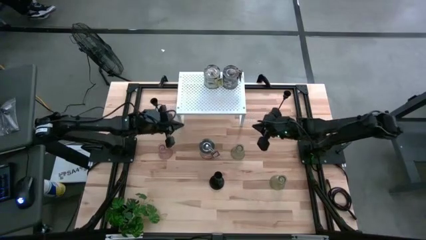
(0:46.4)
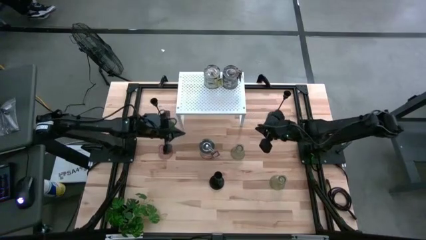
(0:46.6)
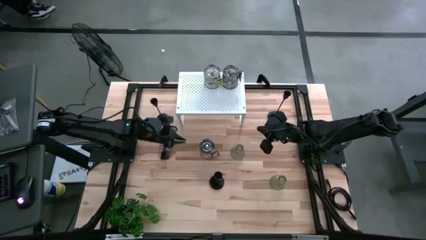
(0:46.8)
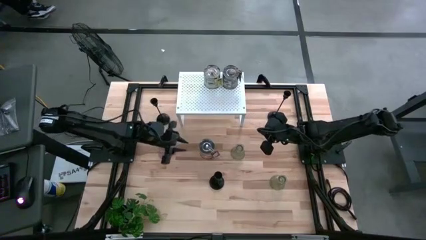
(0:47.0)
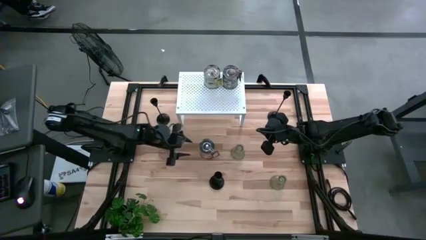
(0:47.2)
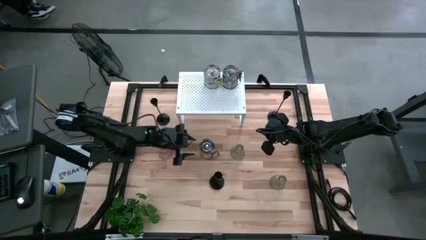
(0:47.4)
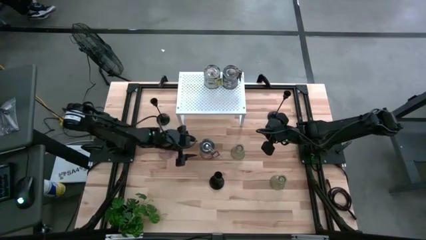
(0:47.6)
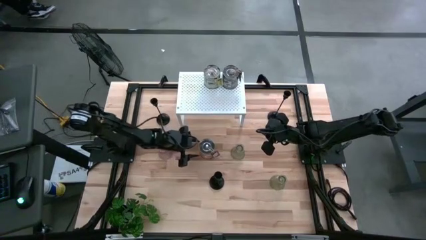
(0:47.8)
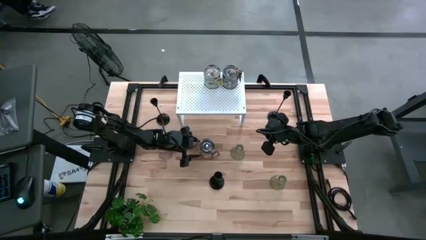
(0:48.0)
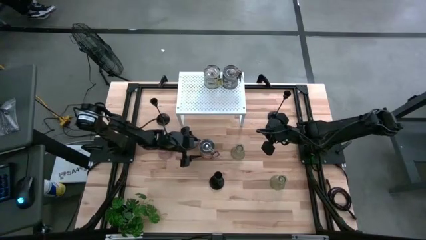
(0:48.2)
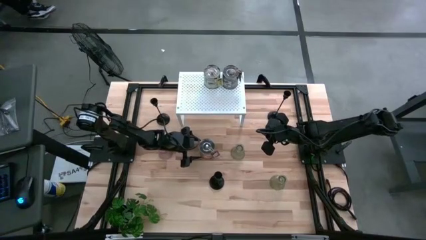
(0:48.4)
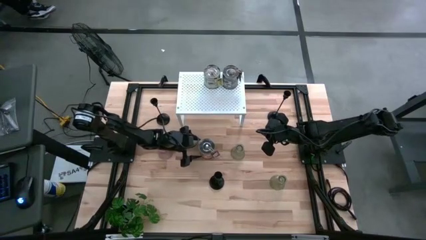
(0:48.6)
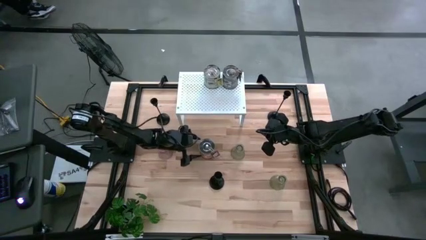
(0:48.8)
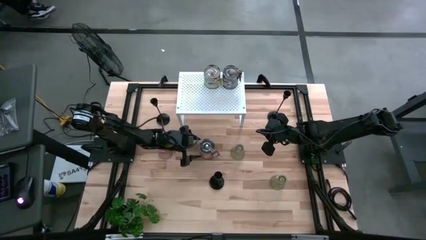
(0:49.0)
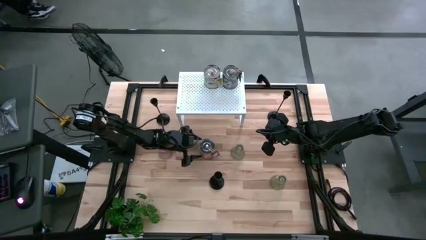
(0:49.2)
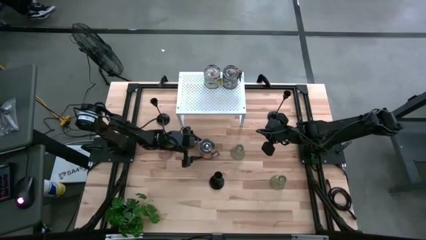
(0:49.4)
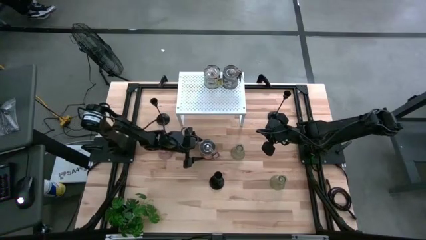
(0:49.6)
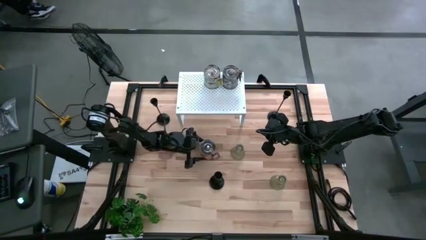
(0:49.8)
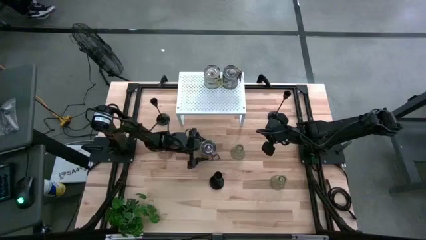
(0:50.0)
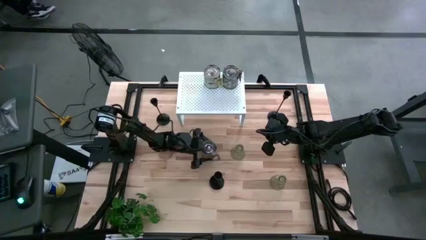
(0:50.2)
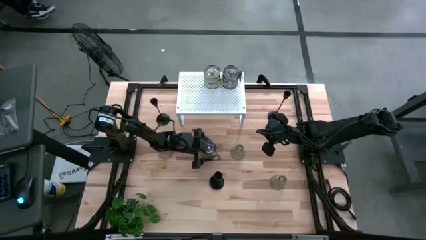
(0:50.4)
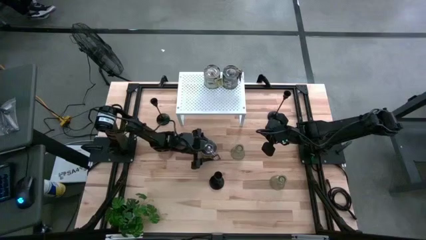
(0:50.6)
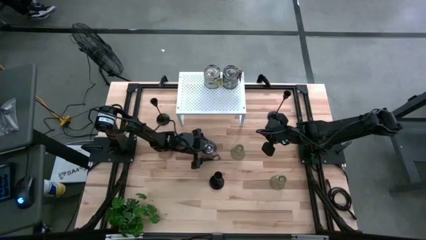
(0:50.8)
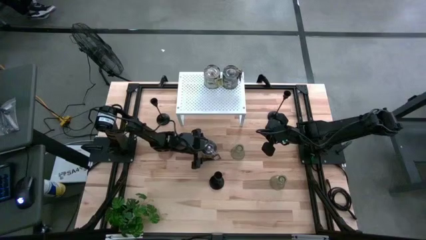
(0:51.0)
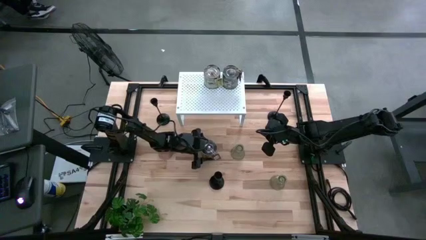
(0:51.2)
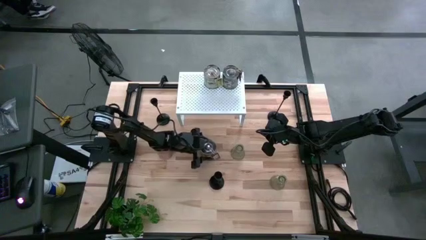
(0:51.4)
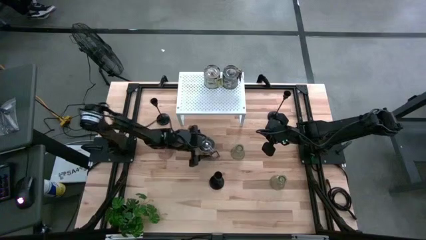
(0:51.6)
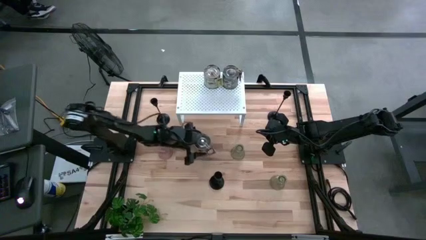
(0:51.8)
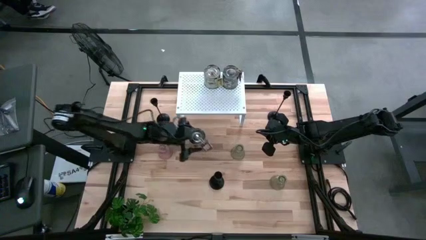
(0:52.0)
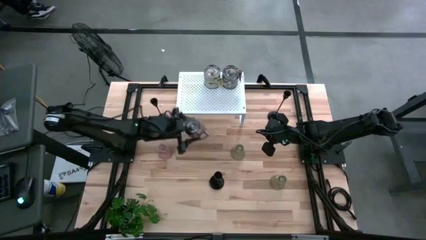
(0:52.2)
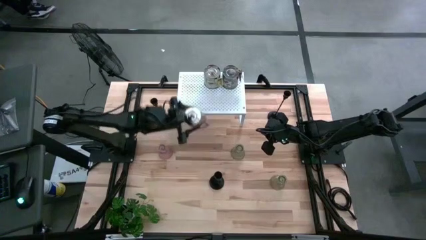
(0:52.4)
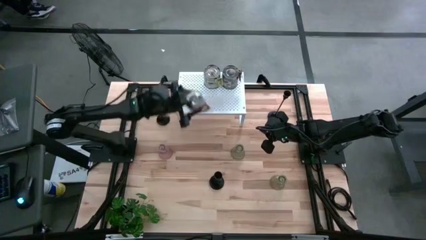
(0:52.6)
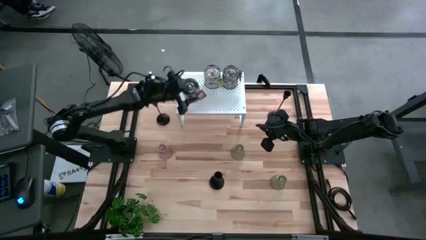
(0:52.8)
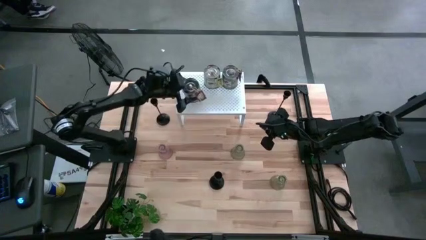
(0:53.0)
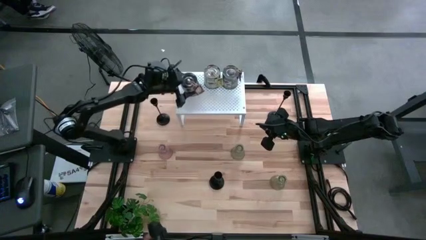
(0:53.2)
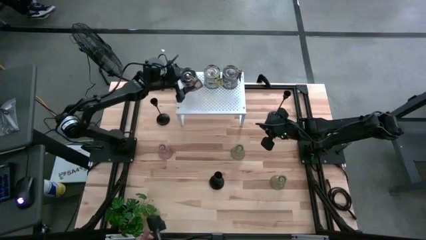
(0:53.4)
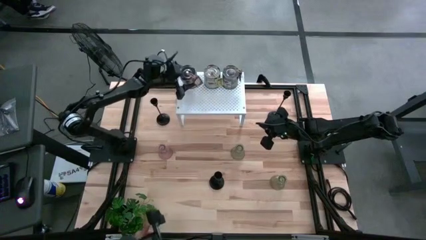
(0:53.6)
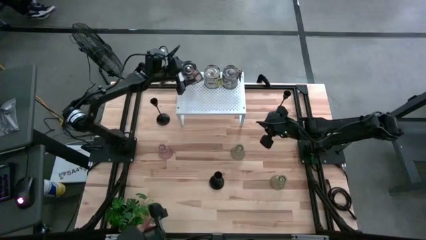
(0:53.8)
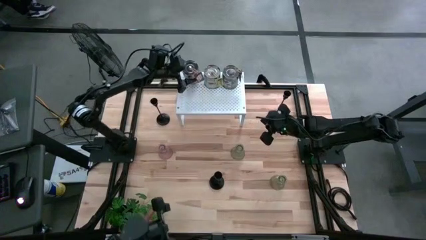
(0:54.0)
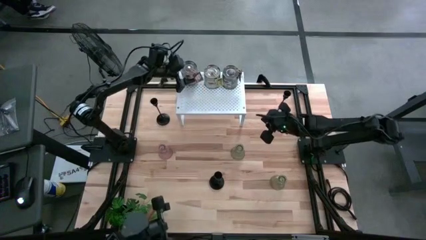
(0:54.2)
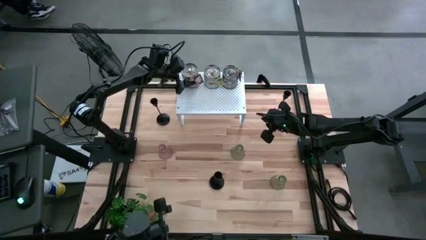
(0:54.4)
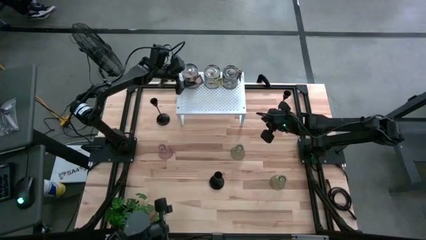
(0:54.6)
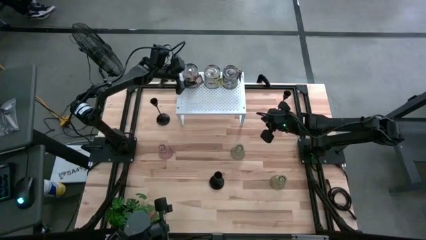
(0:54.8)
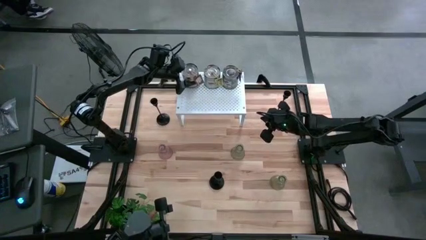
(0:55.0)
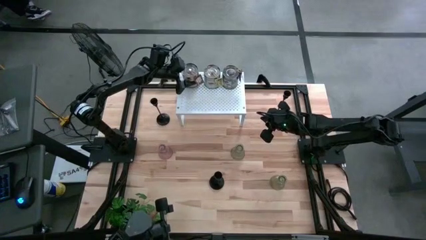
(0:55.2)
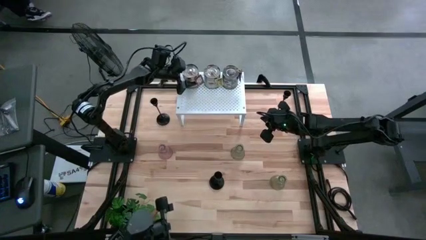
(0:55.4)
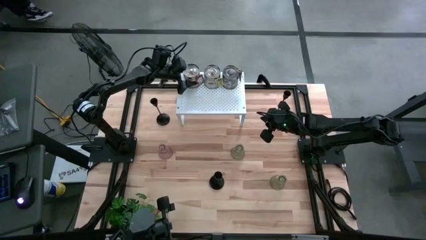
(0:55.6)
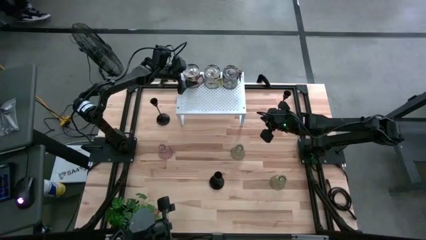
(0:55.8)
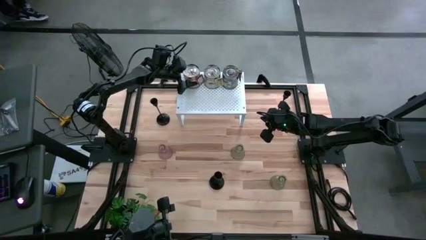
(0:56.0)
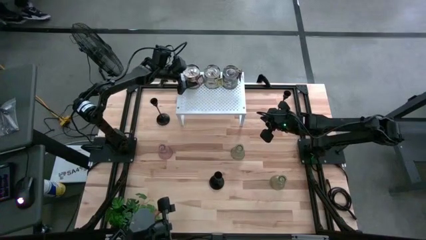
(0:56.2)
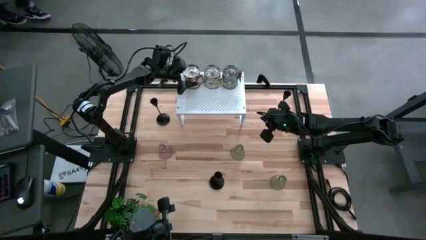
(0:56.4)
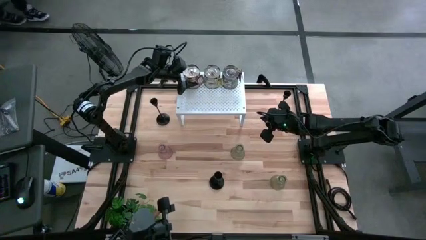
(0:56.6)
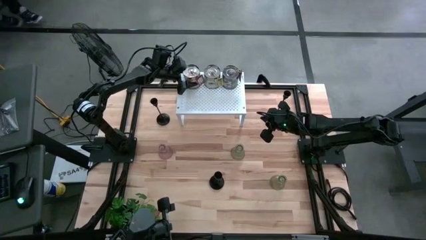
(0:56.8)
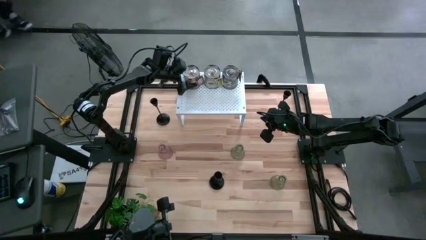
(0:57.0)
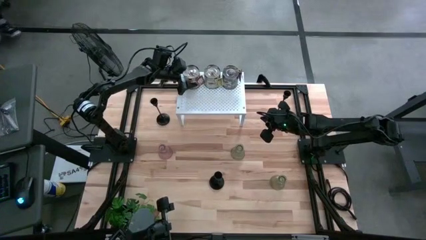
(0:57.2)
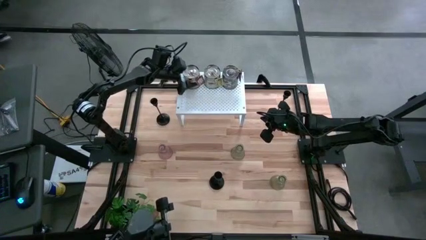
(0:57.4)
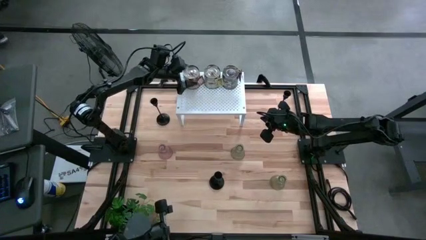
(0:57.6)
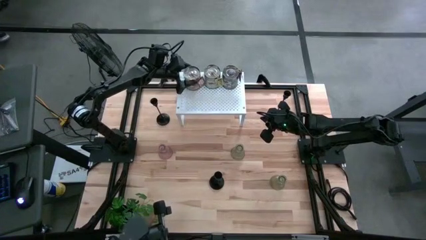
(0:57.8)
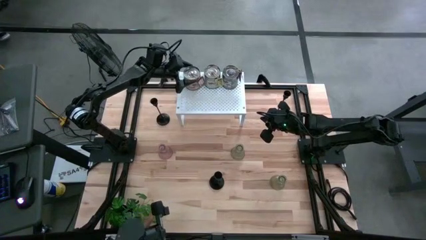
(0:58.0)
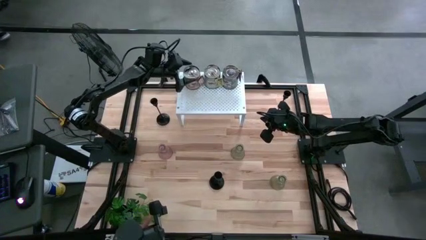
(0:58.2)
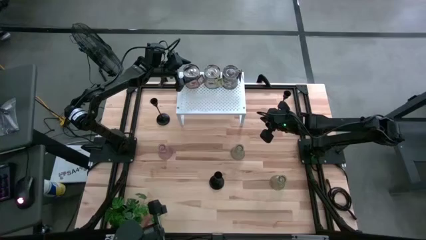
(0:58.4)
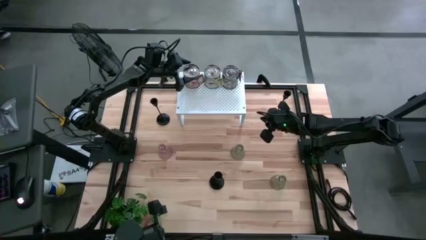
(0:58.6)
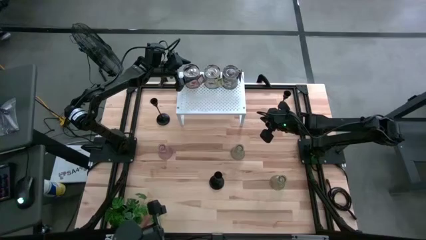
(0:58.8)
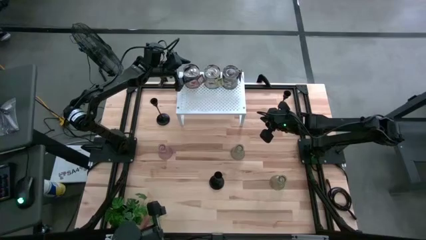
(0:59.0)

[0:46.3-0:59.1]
Task: Pick & Place candle stick holders
Align the scented candle on the shelf with the other scented candles

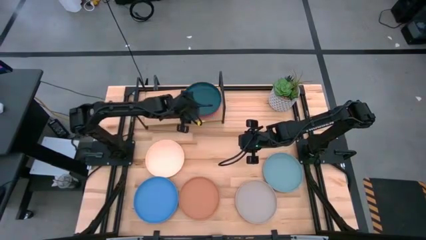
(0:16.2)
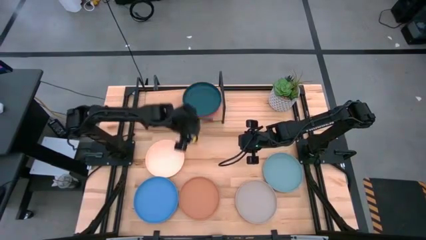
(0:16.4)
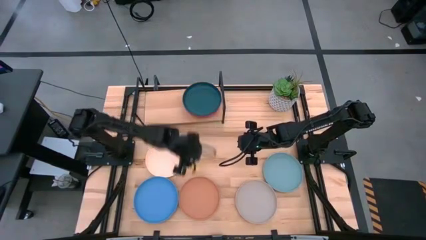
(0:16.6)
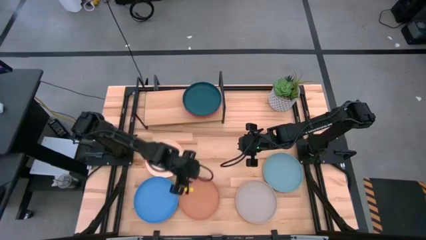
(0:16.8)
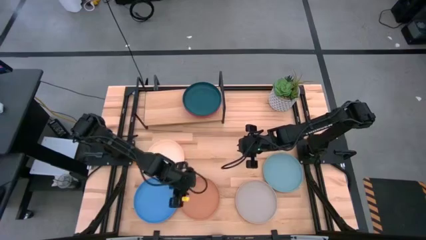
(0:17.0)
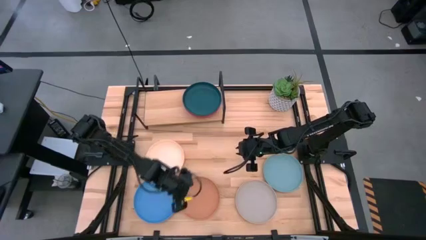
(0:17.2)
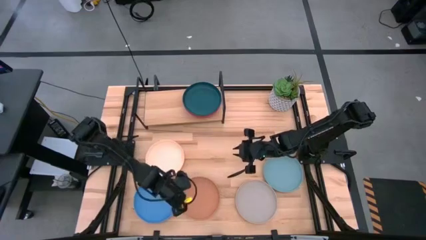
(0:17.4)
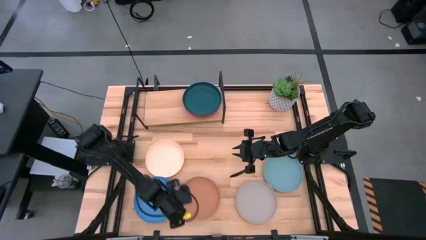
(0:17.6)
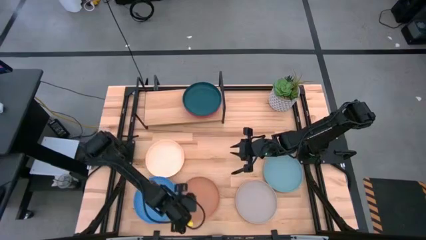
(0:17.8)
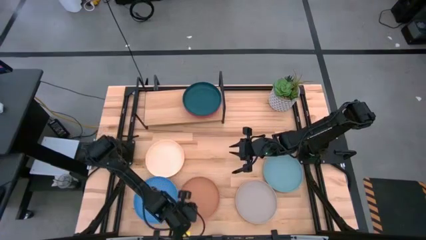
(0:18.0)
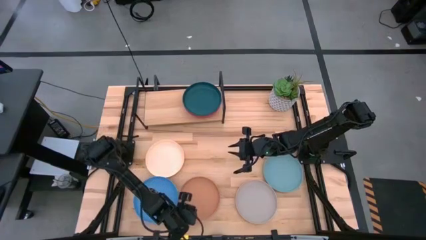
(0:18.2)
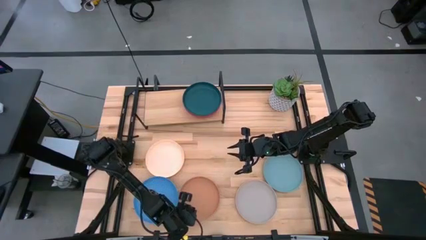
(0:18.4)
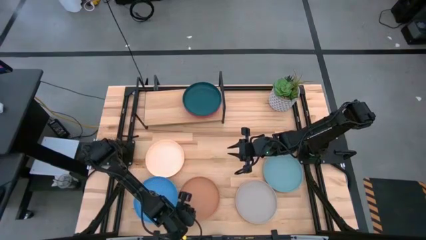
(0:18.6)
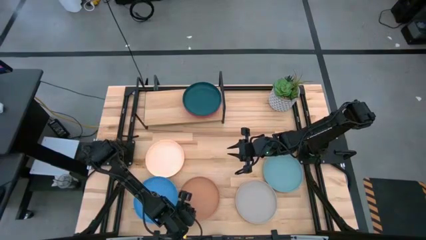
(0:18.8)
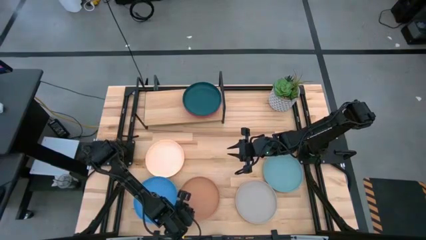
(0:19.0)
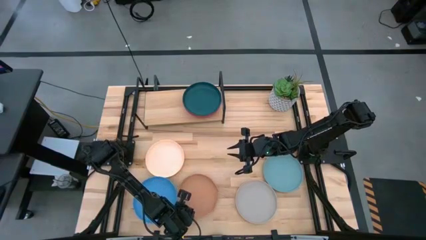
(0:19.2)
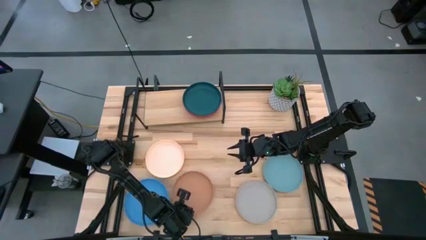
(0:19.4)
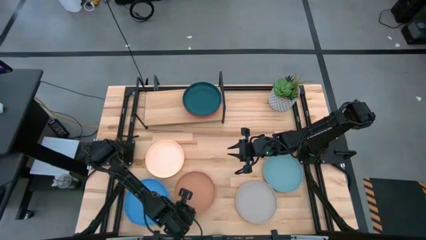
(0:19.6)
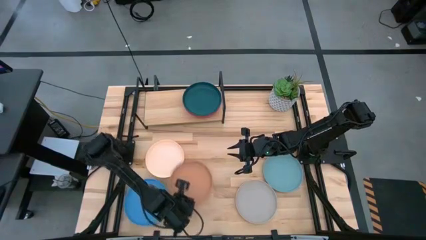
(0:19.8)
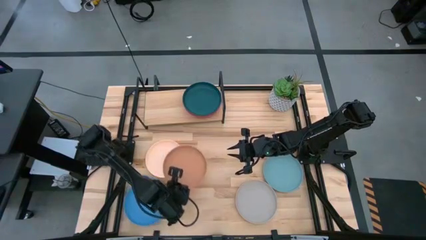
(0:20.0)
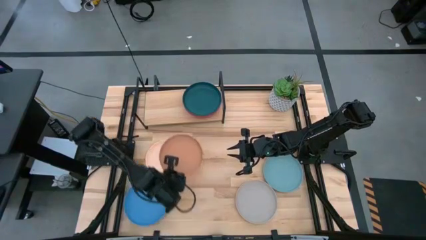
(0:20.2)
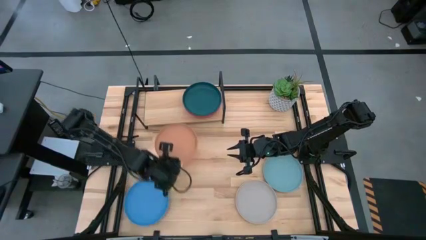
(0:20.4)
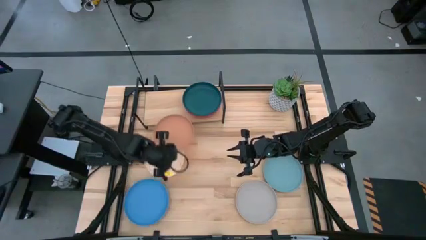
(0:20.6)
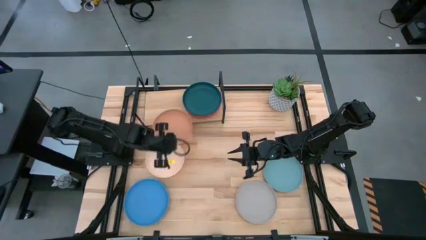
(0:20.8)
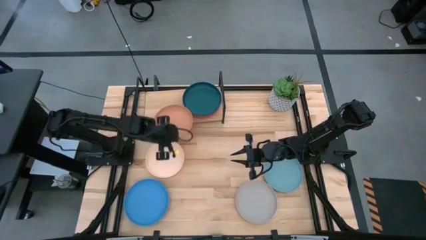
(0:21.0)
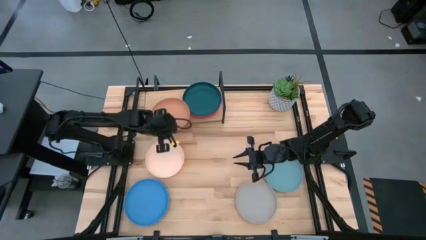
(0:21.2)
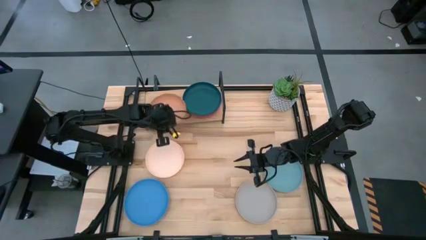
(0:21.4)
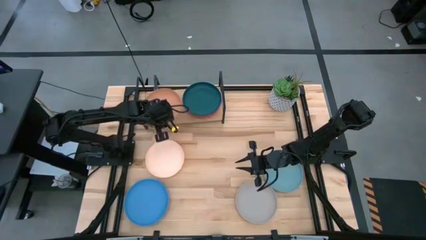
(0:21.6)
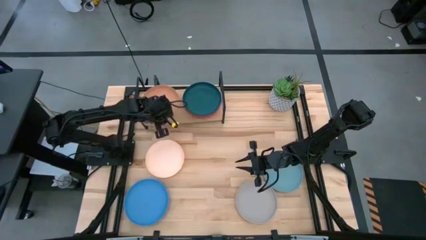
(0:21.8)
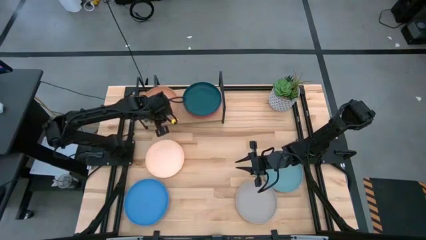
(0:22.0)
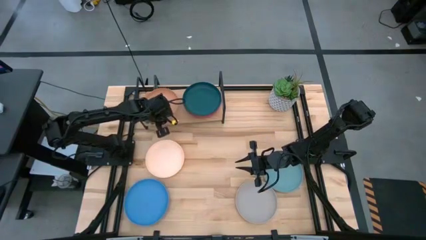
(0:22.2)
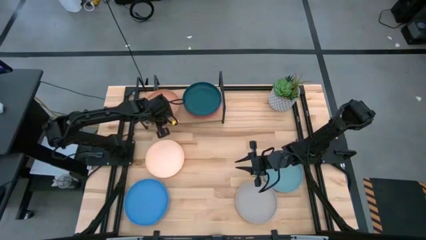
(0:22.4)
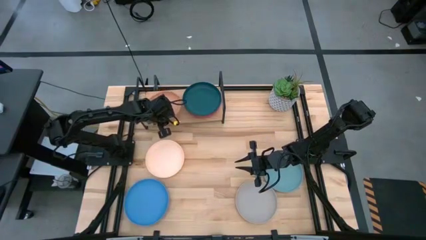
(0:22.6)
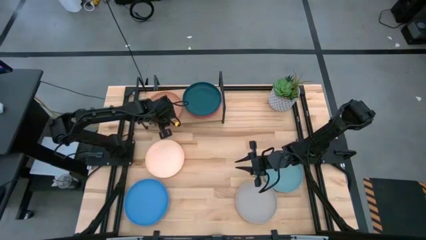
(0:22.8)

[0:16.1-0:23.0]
Task: Place and stack plates onto a shelf
Put the brown plate on the shelf
